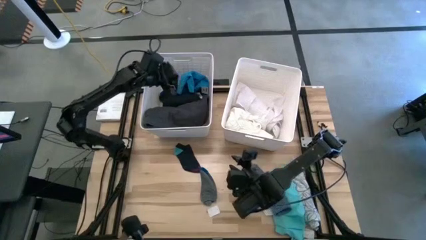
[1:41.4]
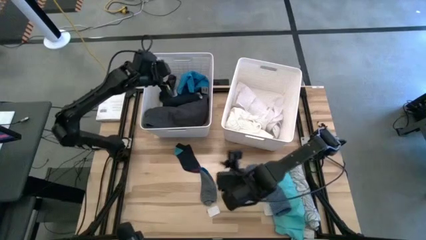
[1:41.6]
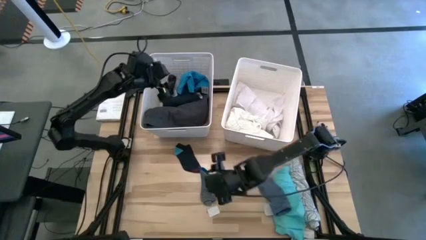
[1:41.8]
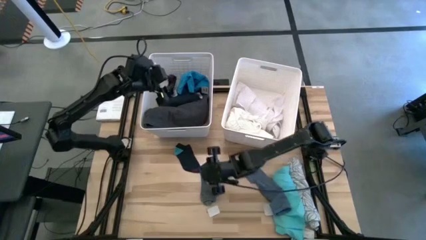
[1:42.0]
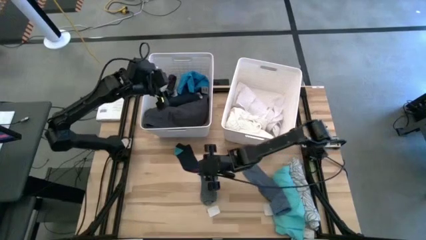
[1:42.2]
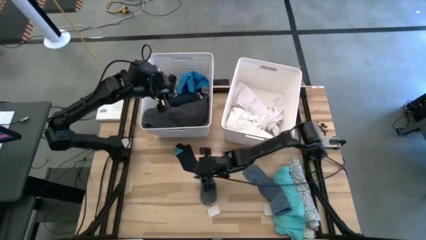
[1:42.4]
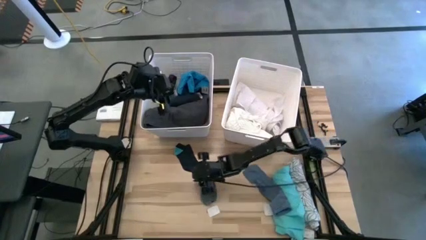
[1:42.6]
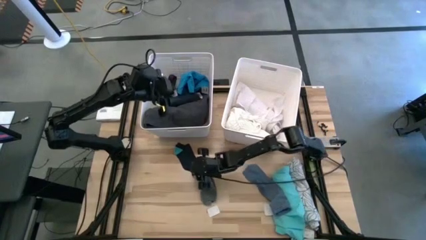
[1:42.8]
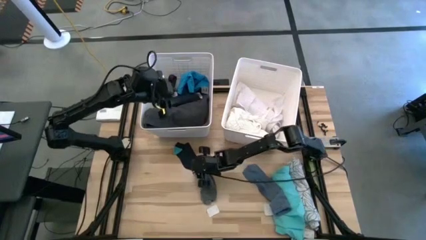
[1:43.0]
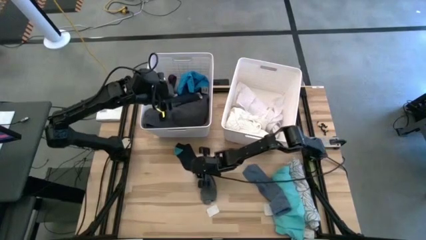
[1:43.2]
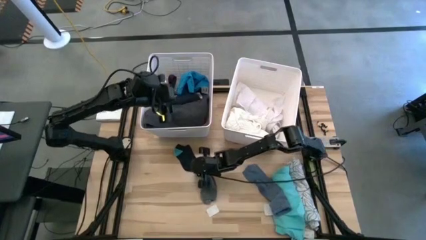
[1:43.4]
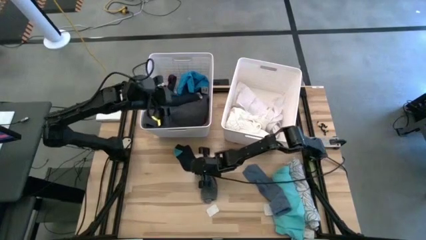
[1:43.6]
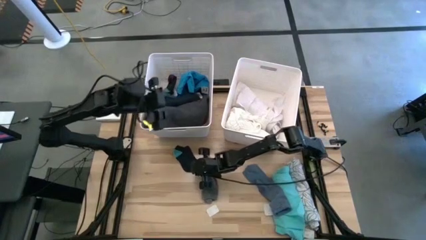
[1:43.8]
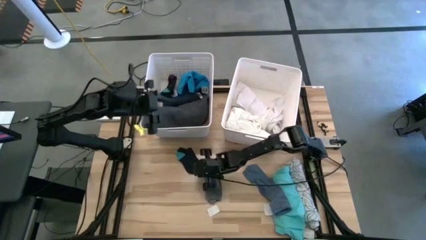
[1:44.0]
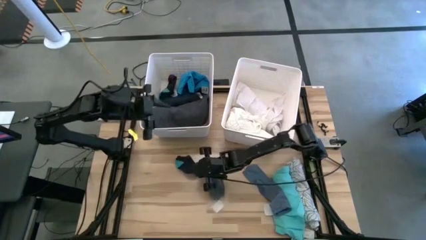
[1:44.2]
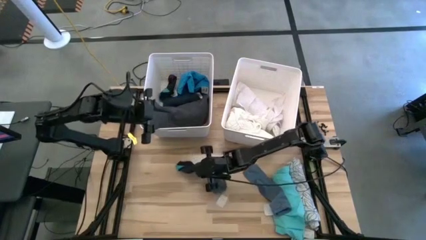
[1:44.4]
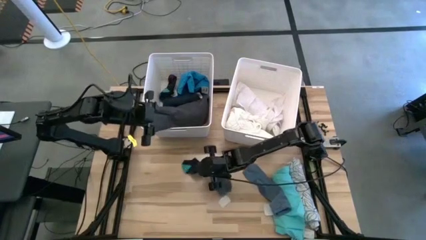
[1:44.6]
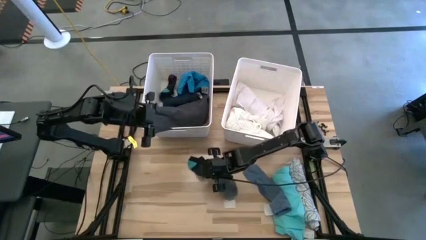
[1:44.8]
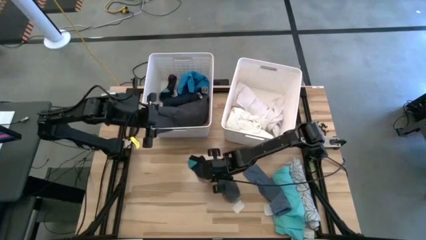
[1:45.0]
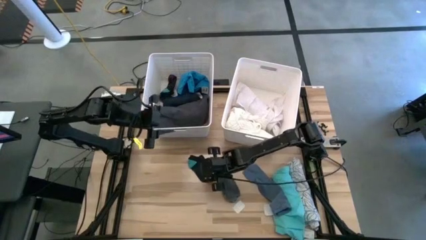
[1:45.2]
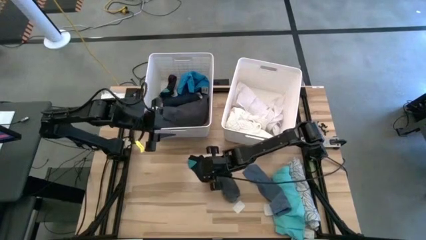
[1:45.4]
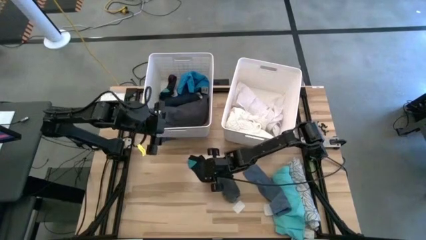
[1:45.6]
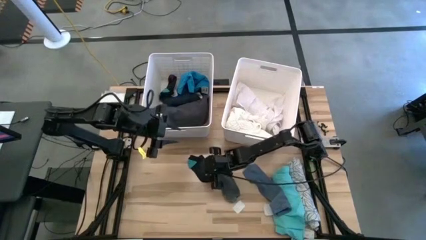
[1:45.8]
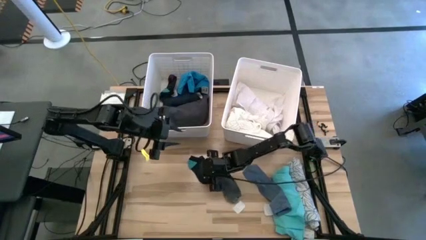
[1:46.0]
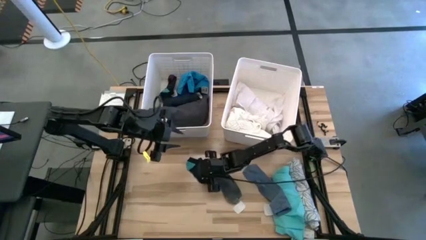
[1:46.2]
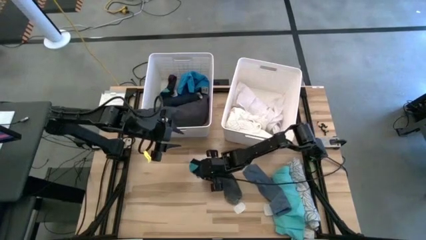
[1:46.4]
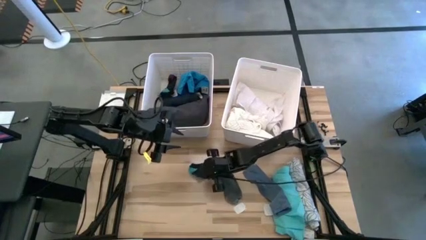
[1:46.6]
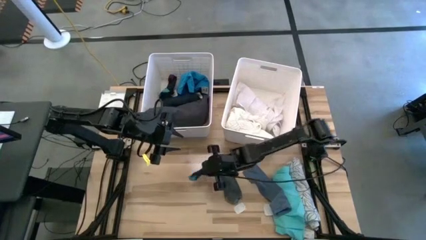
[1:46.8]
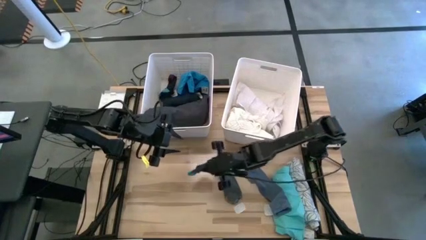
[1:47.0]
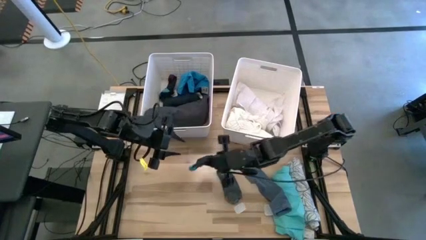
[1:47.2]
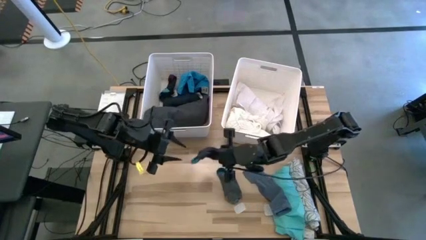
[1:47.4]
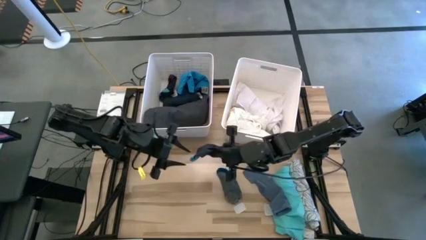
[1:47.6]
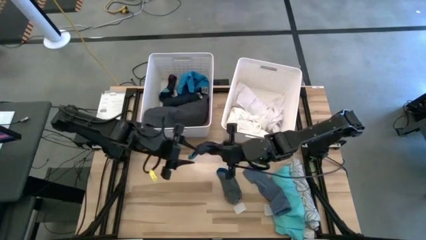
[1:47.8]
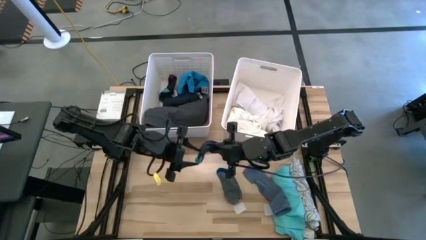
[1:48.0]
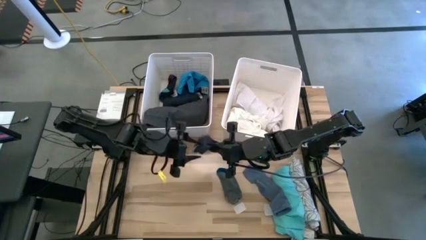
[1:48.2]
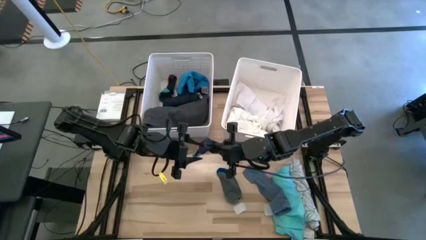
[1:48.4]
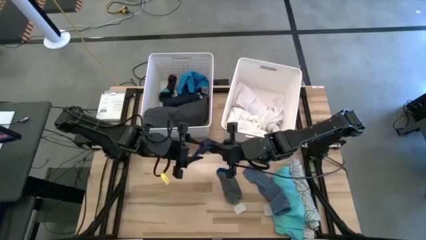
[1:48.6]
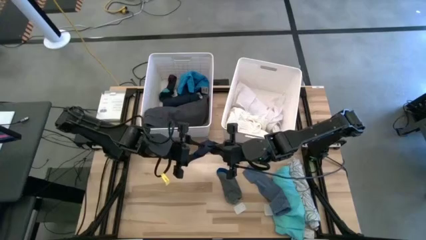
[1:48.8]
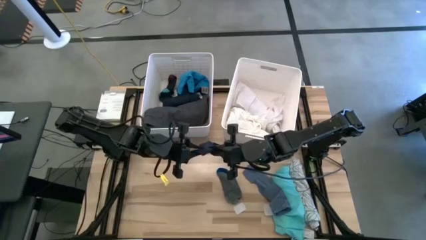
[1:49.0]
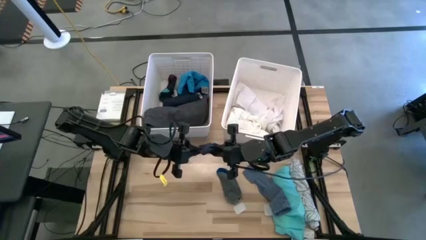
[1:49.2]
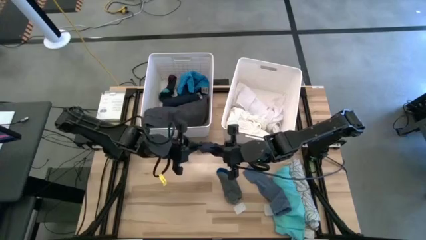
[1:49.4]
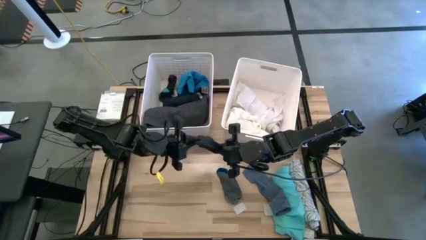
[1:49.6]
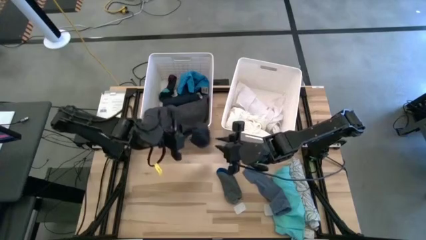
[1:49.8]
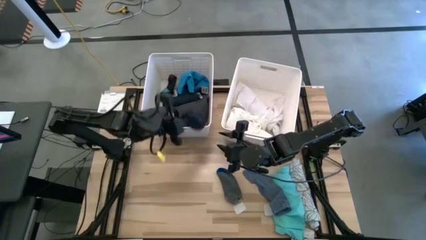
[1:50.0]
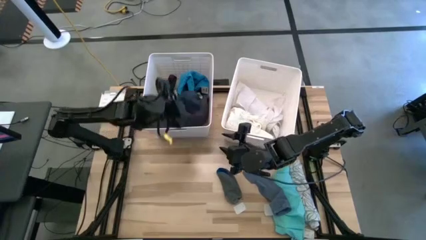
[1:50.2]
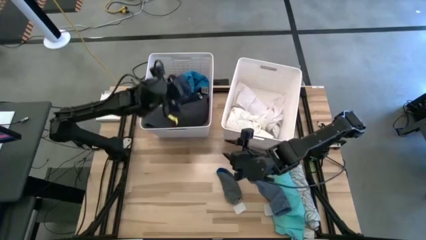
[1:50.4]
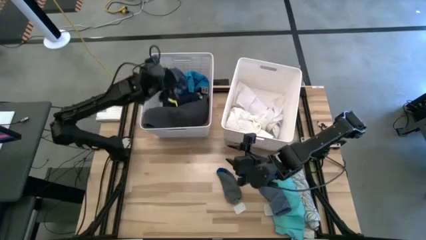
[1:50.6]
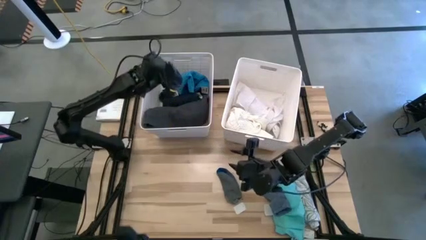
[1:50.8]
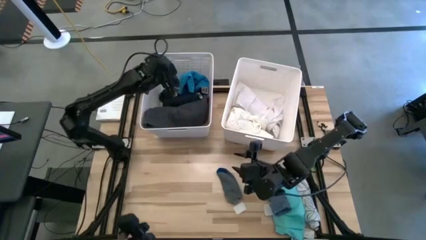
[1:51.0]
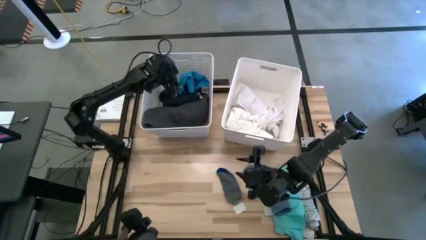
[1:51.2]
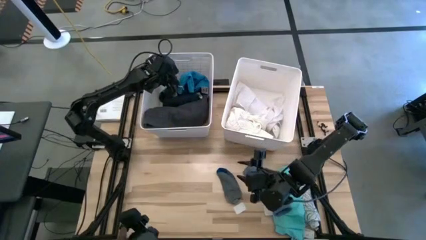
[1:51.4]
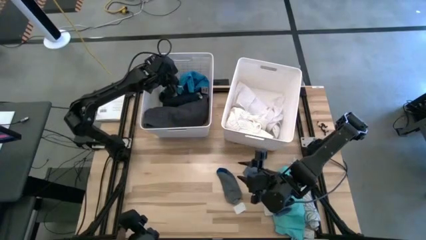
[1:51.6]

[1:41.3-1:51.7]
Task: Sort clothes
Put the purple sock into the left white bin
